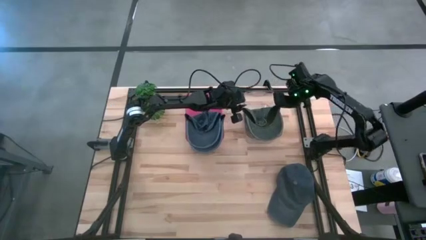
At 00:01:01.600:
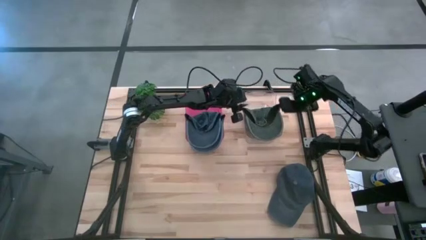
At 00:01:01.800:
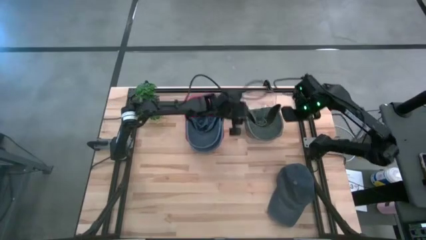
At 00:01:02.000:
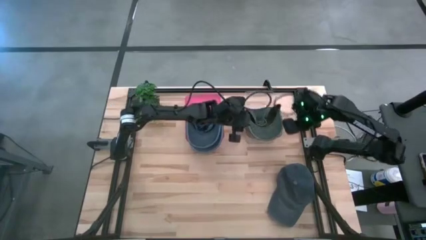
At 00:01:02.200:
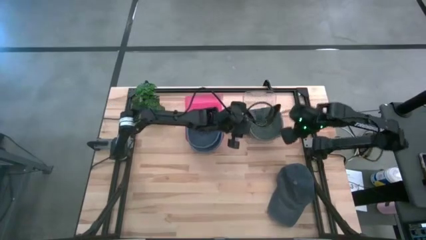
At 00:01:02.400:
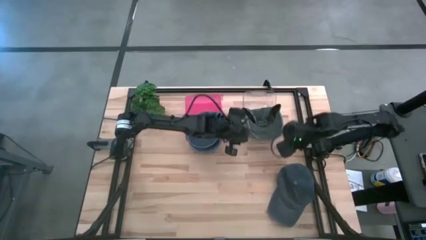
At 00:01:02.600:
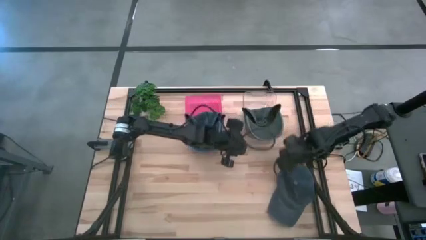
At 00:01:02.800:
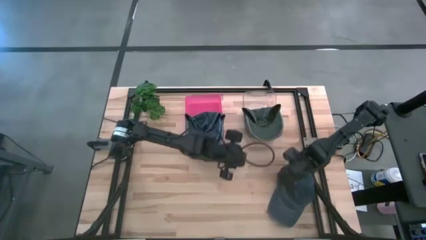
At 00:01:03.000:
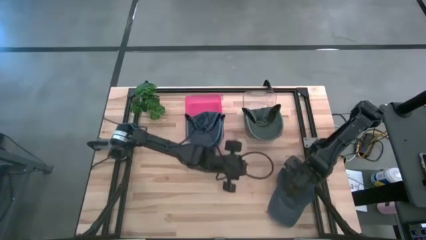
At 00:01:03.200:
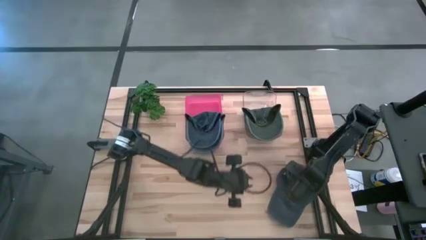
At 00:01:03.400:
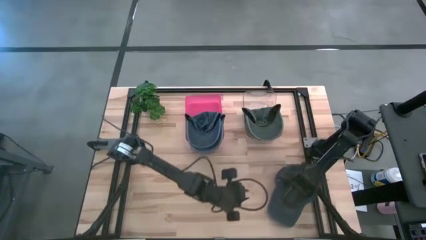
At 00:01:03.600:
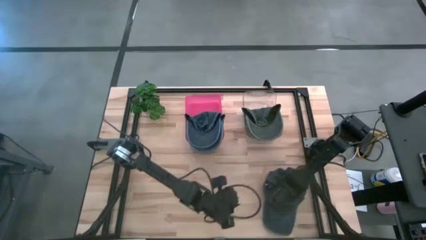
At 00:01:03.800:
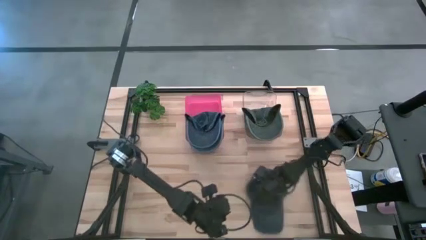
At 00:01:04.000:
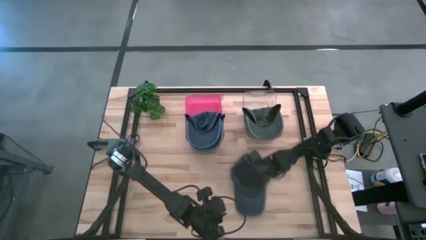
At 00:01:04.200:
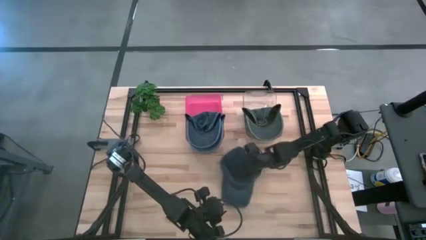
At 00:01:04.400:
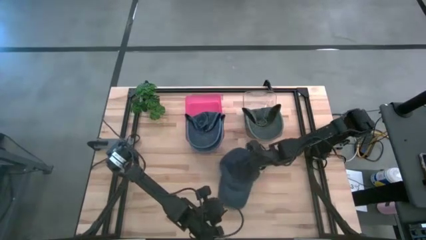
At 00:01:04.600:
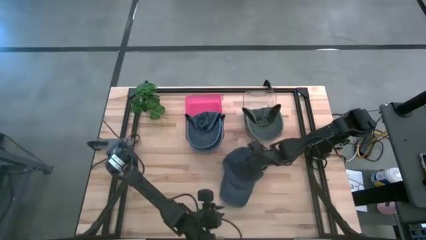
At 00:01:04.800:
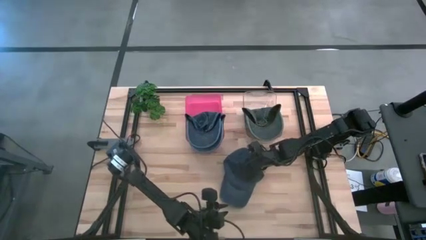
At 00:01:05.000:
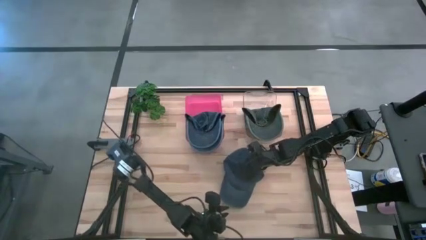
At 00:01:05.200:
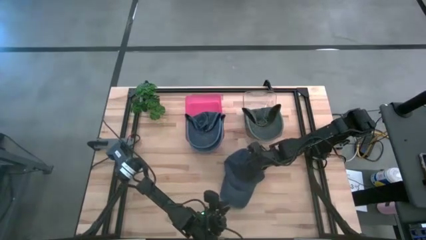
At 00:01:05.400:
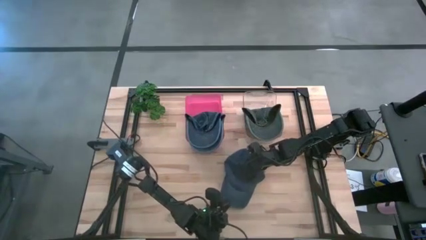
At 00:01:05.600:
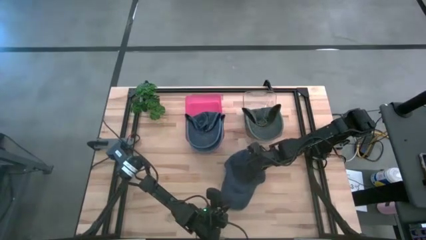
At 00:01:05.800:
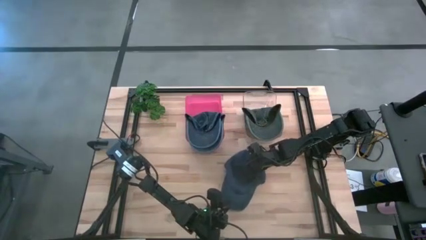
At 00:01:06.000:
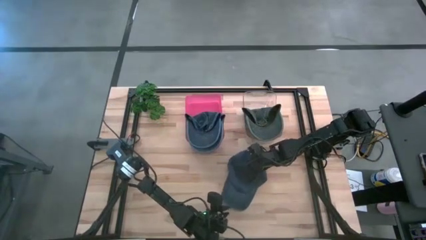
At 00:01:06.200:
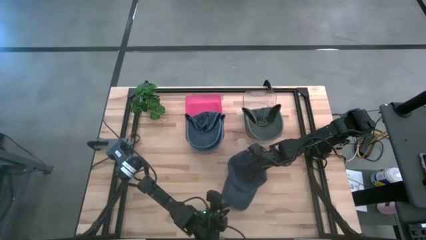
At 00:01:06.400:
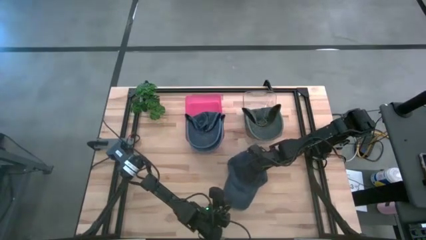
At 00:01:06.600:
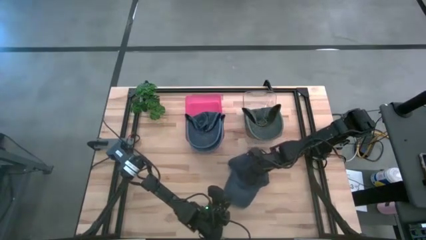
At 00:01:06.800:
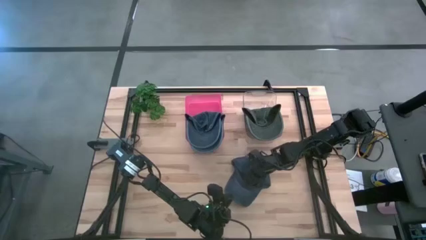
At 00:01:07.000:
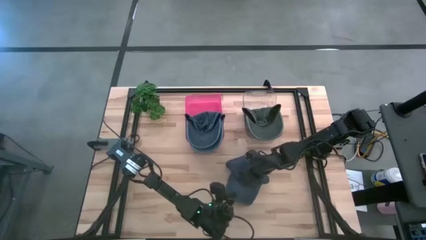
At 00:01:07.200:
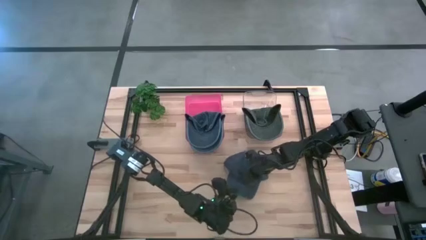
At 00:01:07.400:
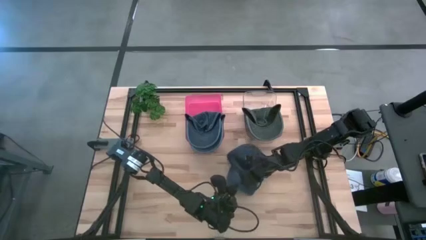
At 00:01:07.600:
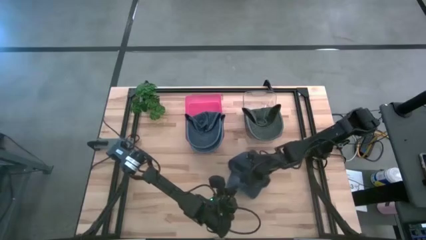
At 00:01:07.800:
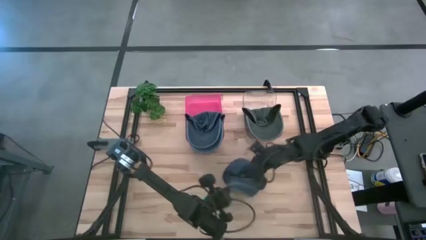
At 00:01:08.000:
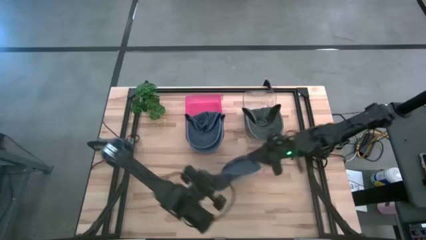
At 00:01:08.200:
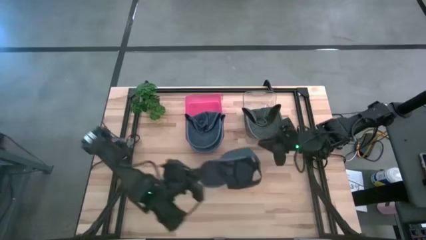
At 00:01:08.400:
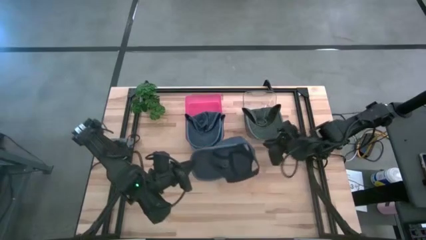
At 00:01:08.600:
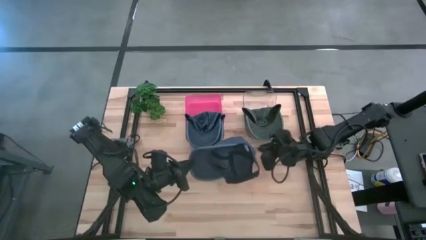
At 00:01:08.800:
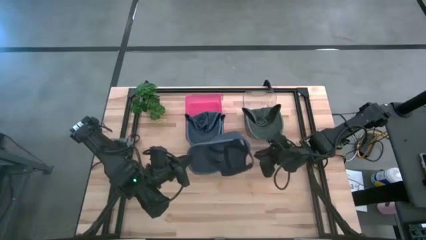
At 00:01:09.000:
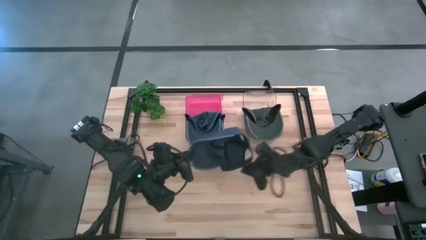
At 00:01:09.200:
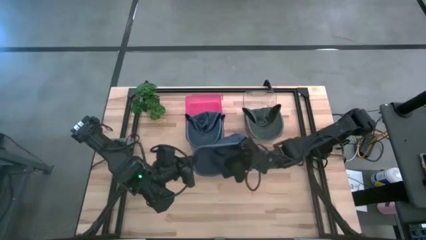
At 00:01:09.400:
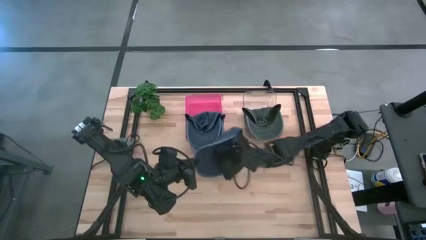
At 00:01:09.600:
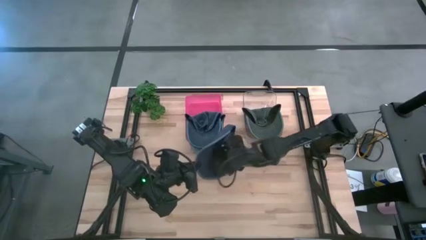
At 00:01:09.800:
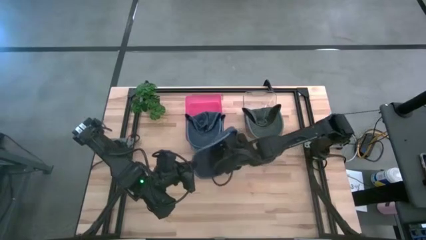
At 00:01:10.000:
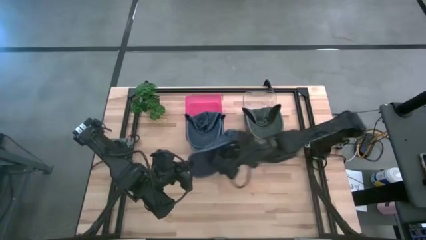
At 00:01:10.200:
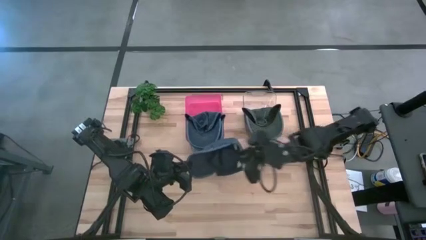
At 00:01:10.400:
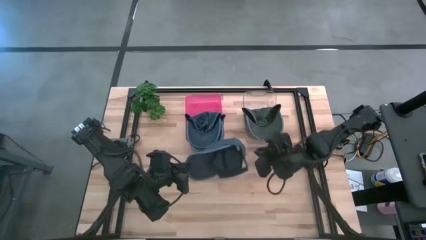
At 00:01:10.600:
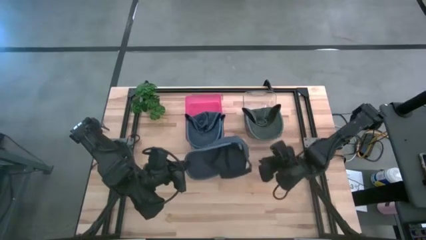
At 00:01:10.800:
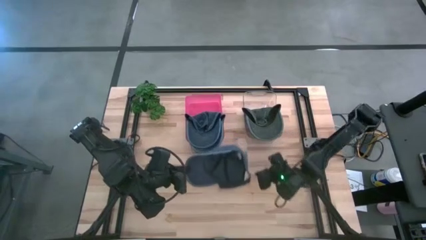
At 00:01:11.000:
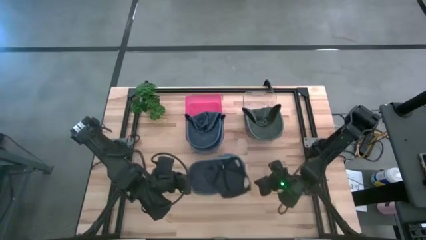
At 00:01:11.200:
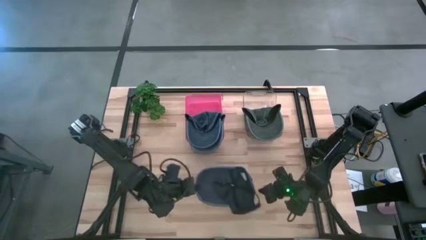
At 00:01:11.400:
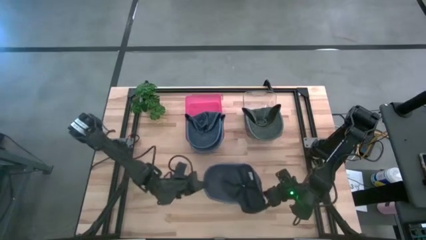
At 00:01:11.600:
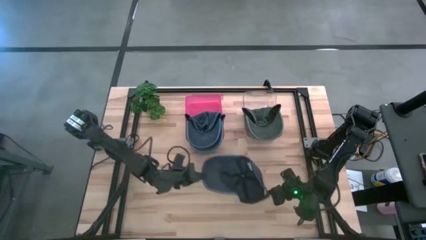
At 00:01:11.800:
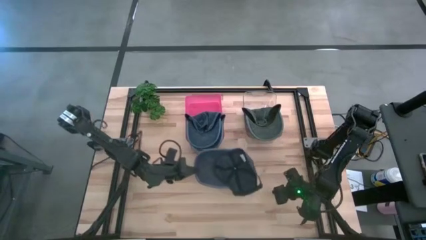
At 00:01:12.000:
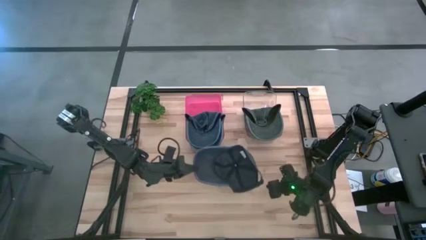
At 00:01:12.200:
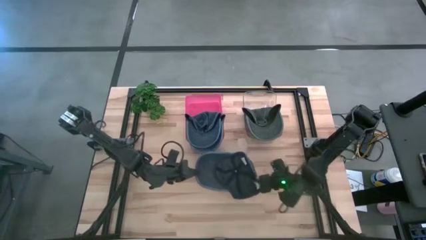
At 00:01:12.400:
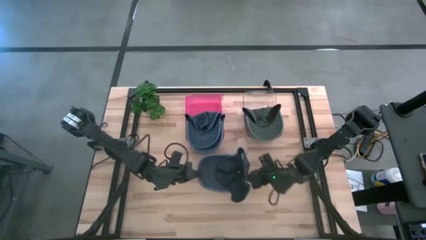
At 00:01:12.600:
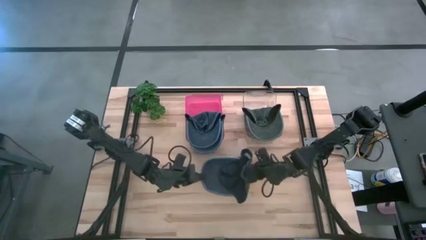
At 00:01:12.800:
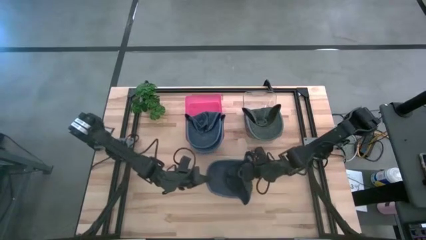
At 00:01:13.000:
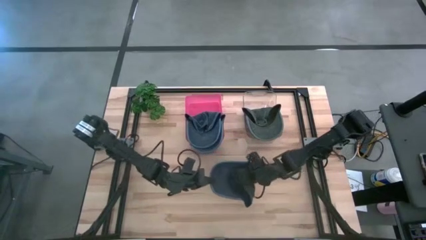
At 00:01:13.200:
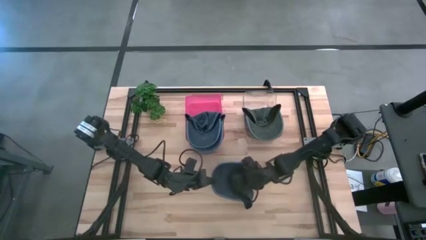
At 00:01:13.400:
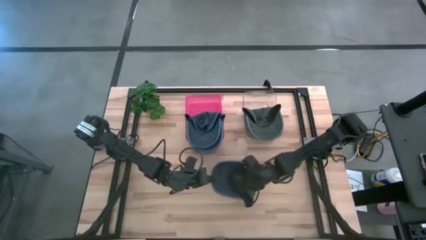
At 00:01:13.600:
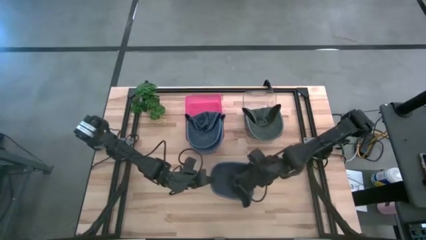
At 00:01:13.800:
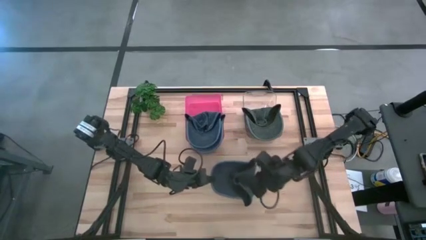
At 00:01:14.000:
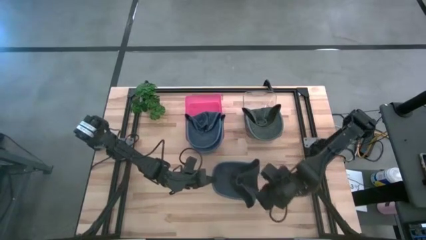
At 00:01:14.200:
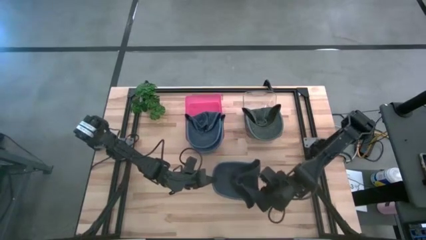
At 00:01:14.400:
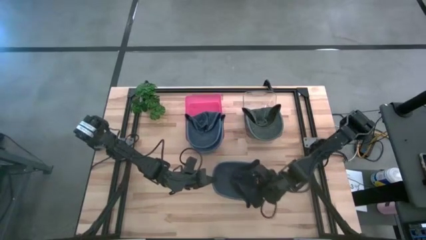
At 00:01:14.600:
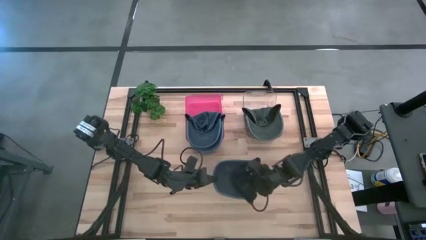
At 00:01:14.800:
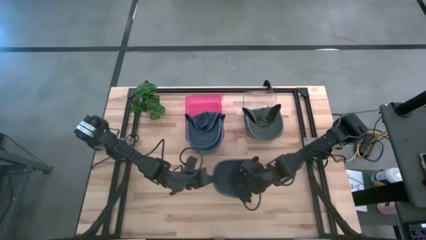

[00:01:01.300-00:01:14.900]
Task: Pick & Place hat
Put the blue cap into the red bin
